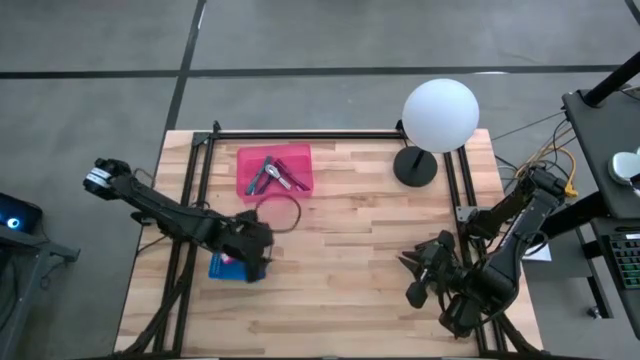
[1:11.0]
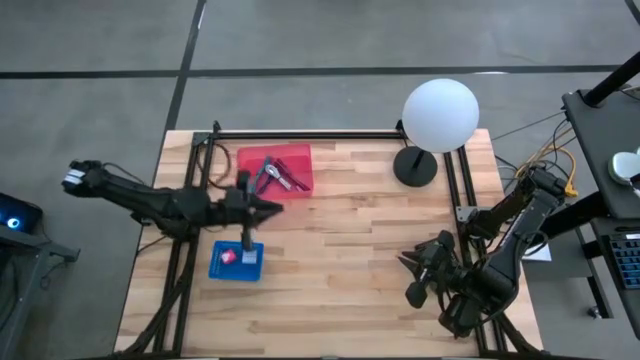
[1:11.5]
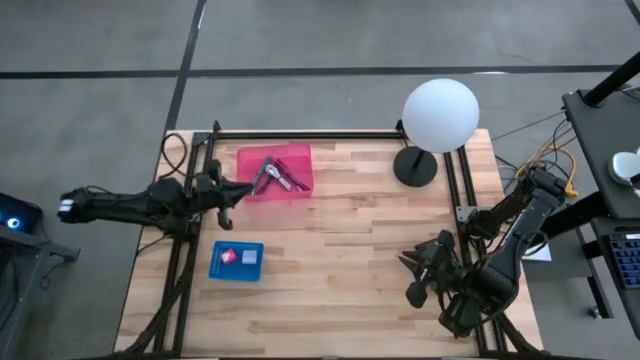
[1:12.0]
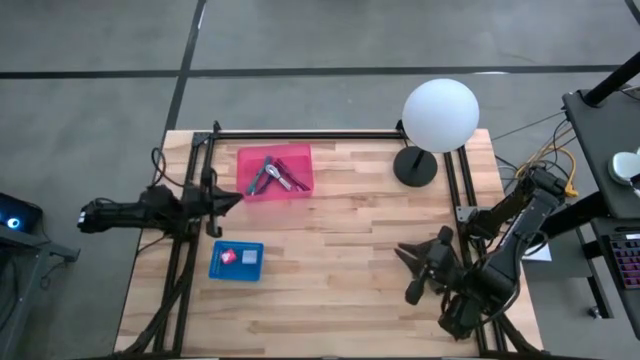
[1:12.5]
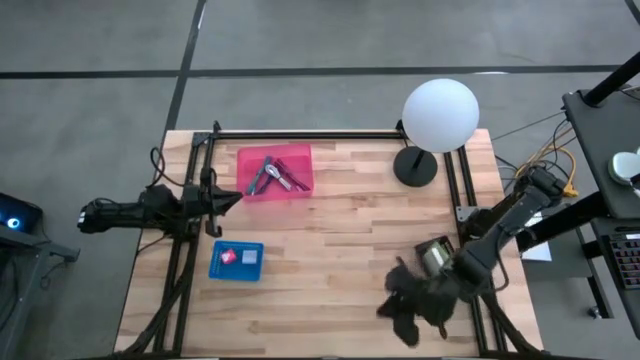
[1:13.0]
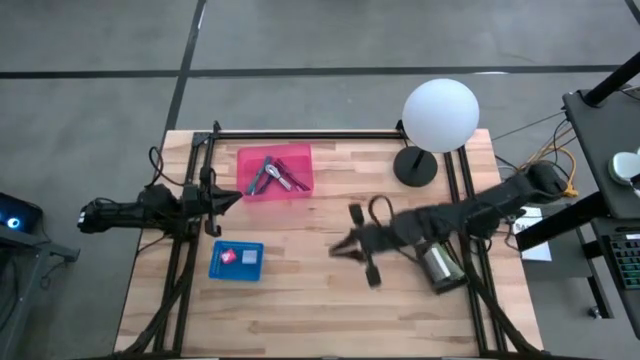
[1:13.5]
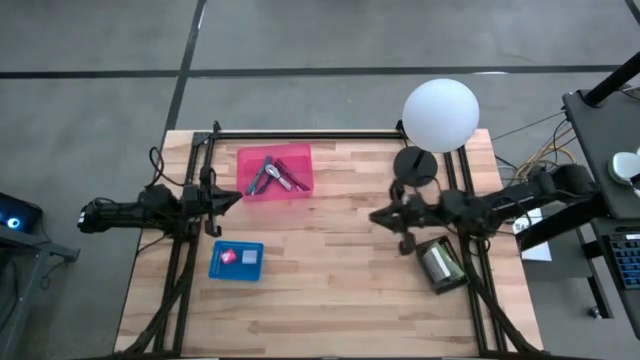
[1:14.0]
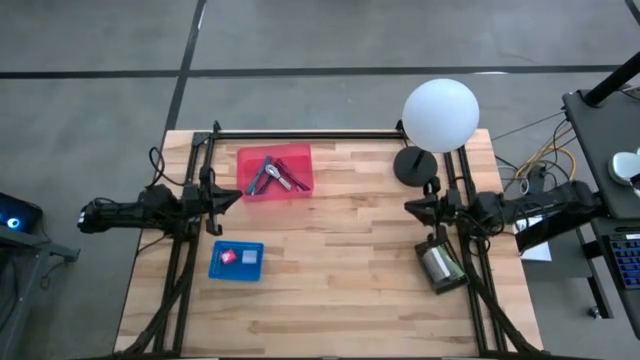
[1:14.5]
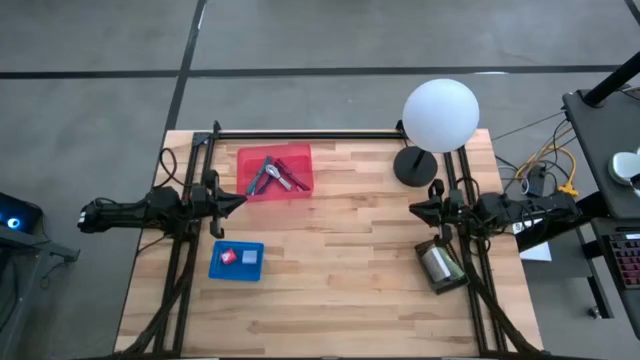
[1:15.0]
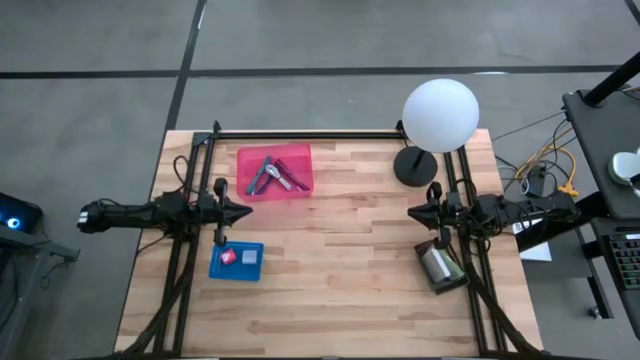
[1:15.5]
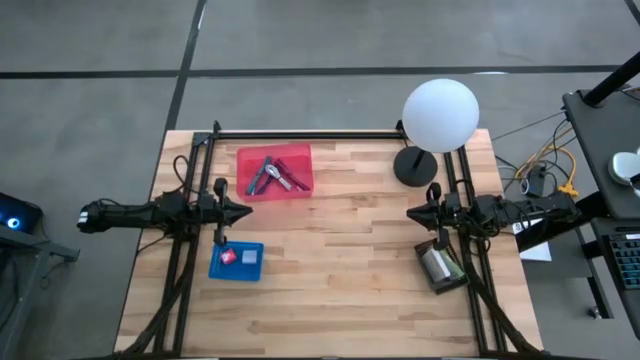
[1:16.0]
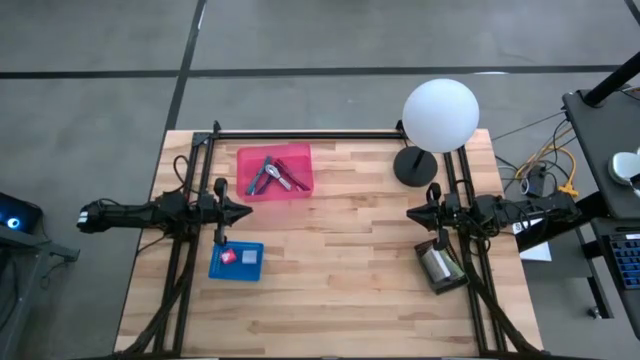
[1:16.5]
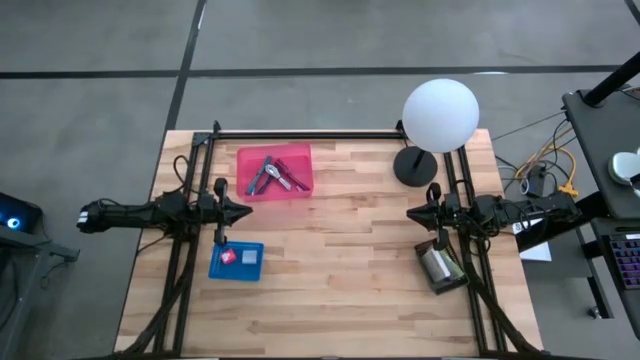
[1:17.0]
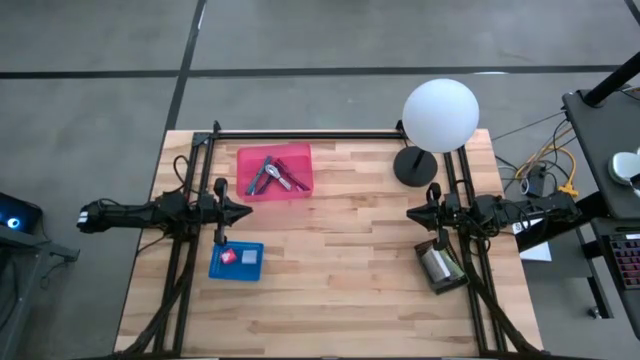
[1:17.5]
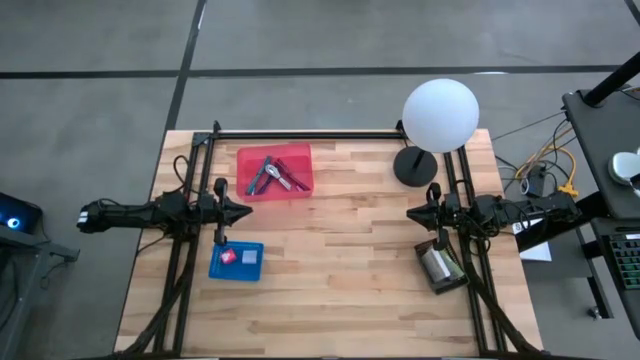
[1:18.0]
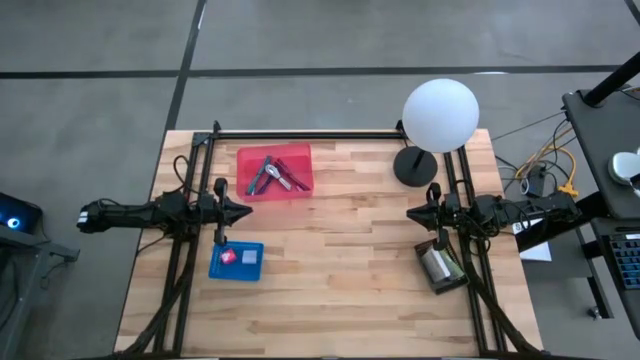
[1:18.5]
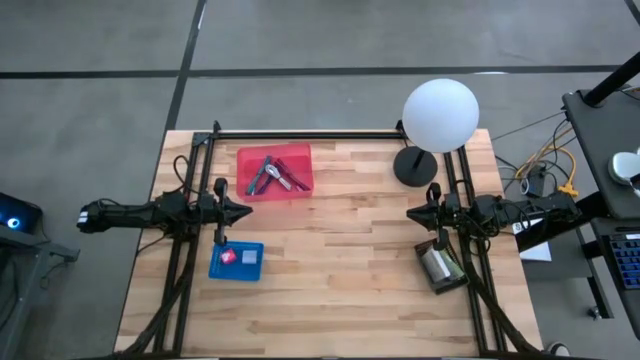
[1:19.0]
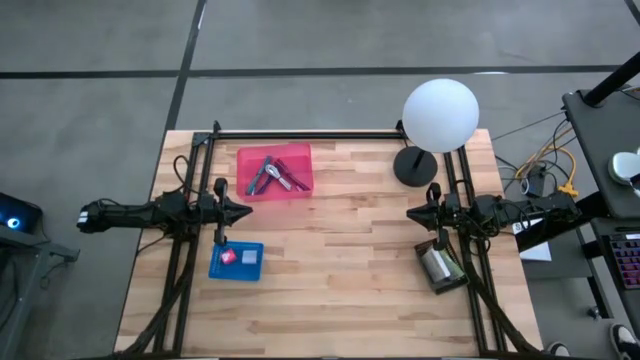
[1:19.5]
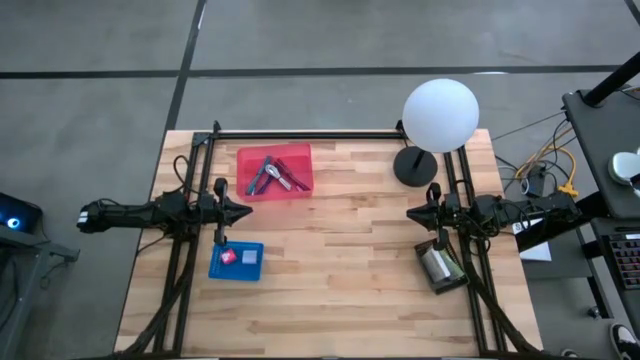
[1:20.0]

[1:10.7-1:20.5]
Task: Pick and place items into bin
Return to Home Position

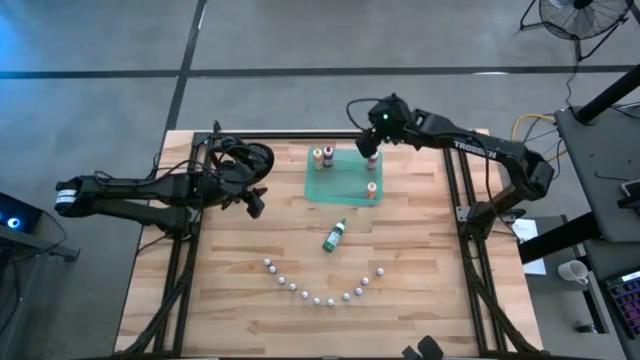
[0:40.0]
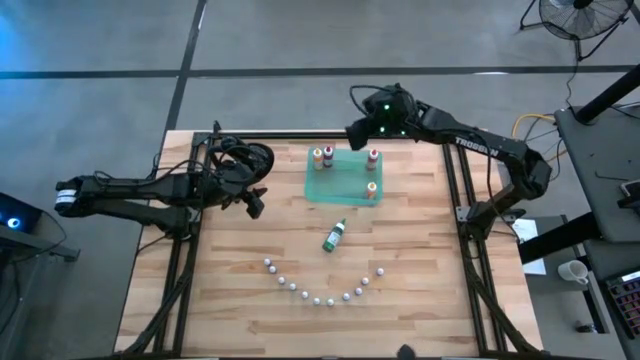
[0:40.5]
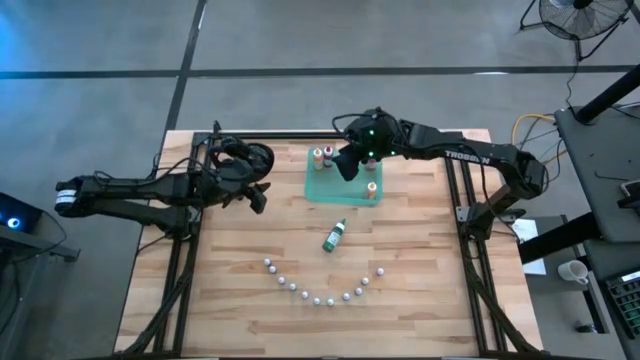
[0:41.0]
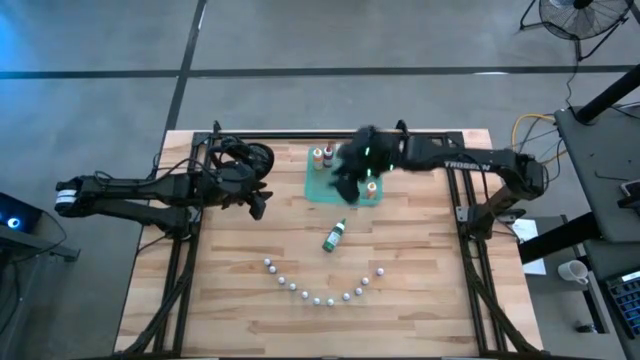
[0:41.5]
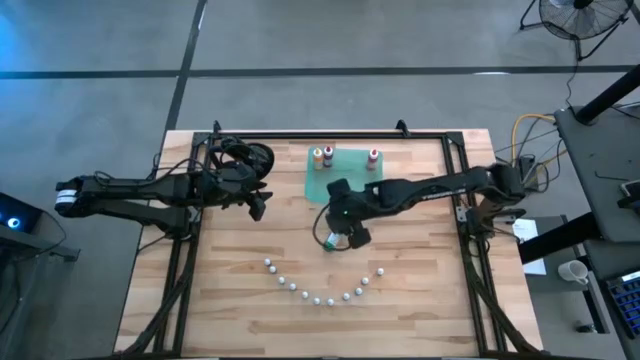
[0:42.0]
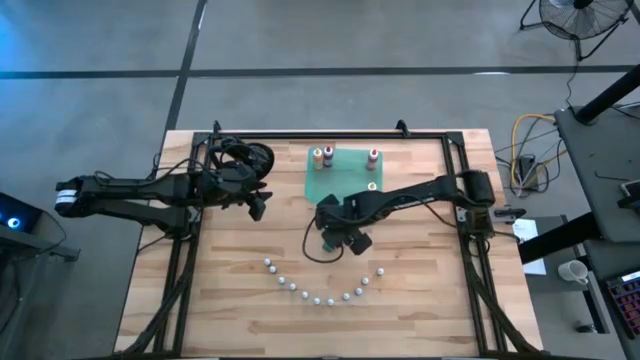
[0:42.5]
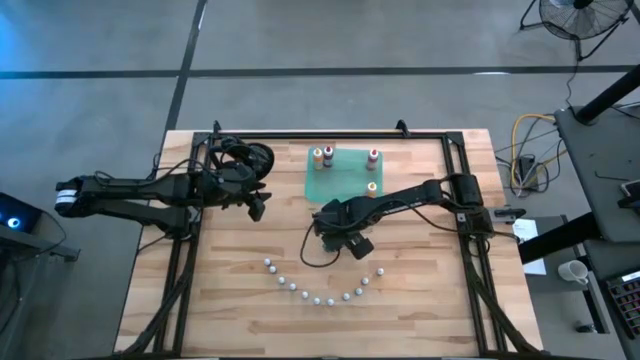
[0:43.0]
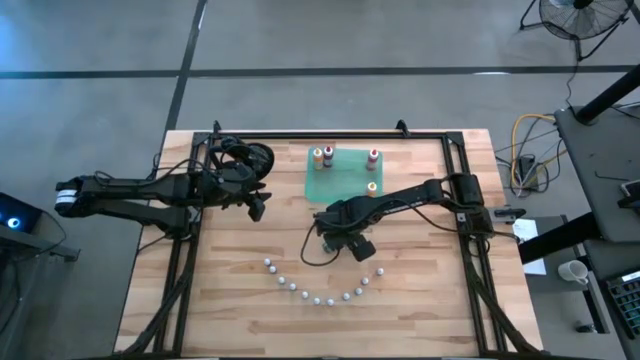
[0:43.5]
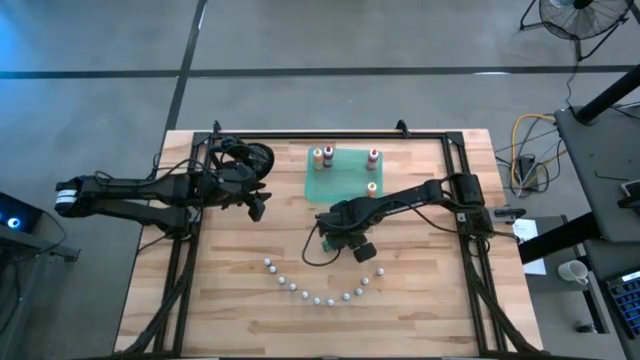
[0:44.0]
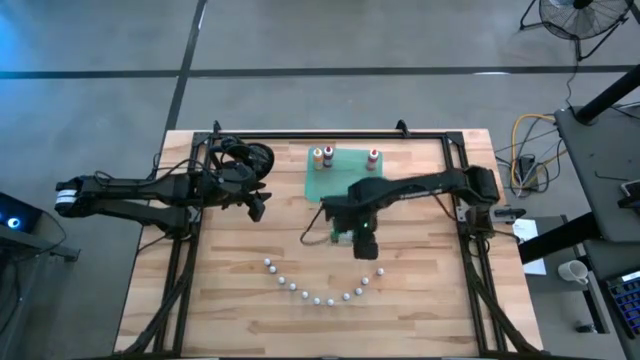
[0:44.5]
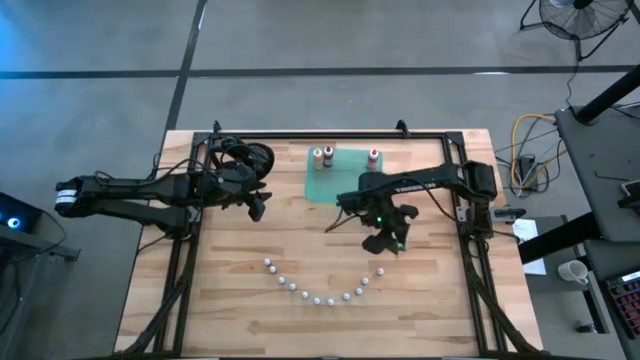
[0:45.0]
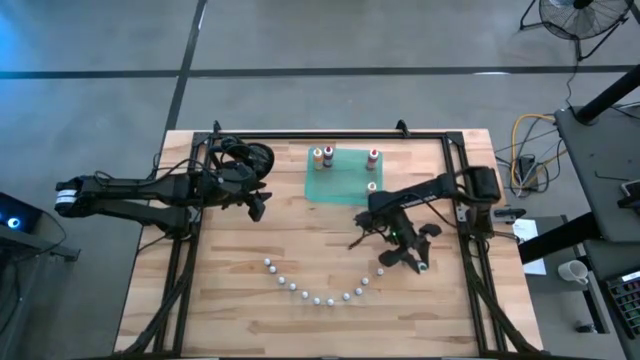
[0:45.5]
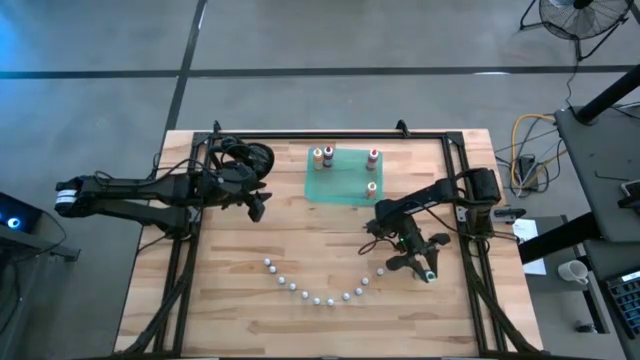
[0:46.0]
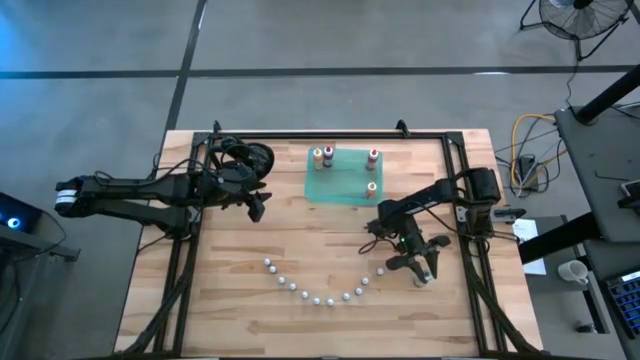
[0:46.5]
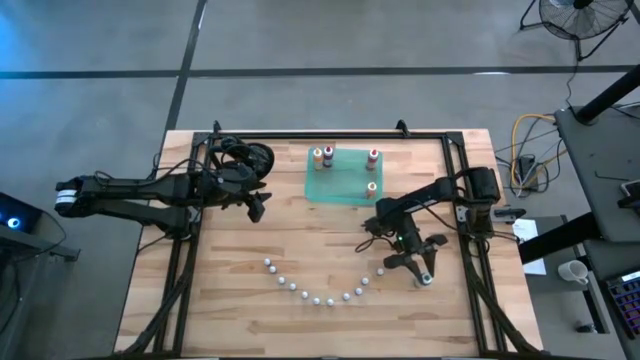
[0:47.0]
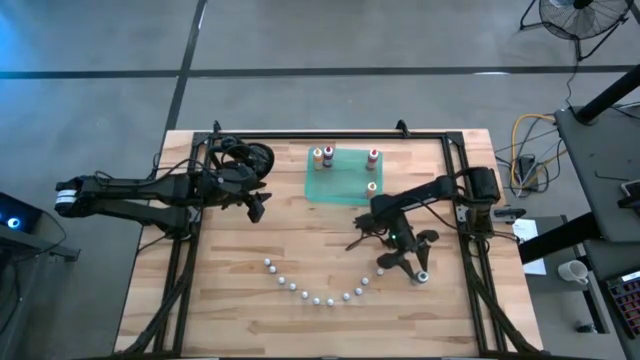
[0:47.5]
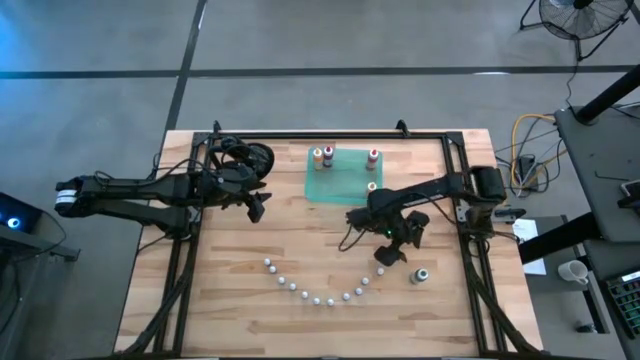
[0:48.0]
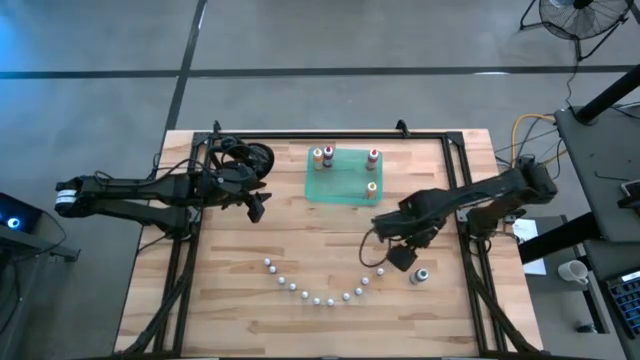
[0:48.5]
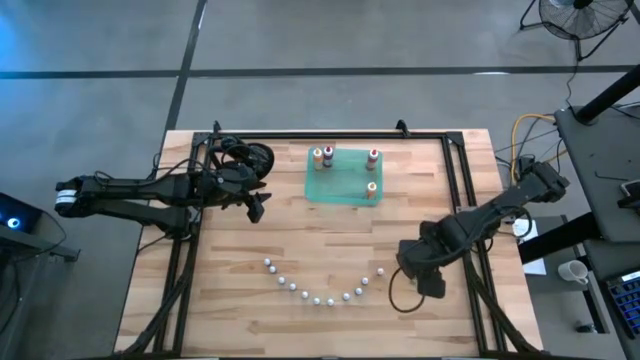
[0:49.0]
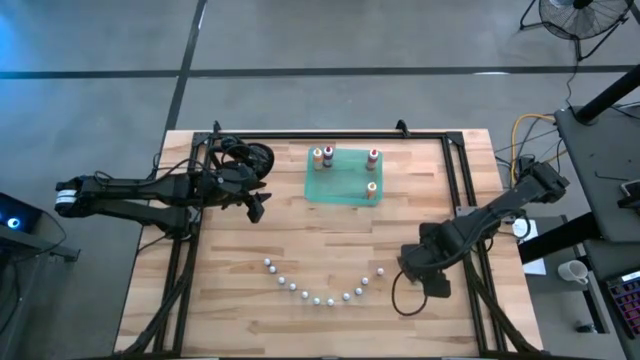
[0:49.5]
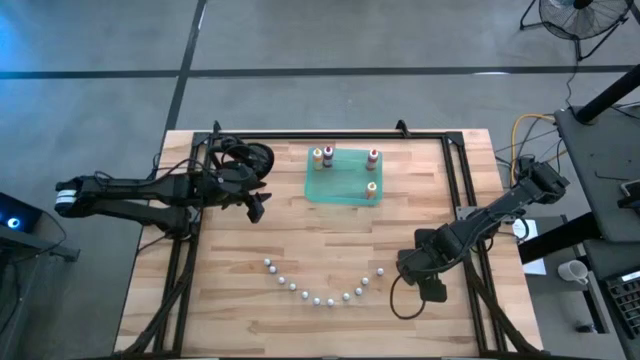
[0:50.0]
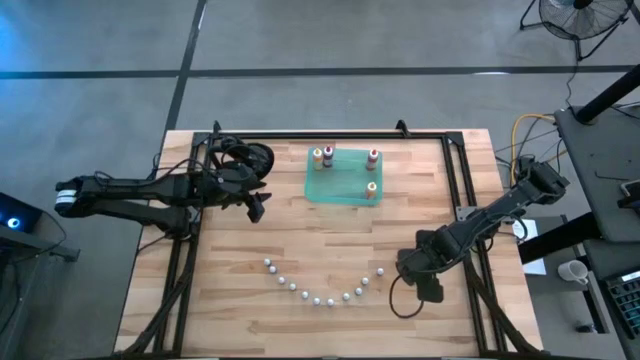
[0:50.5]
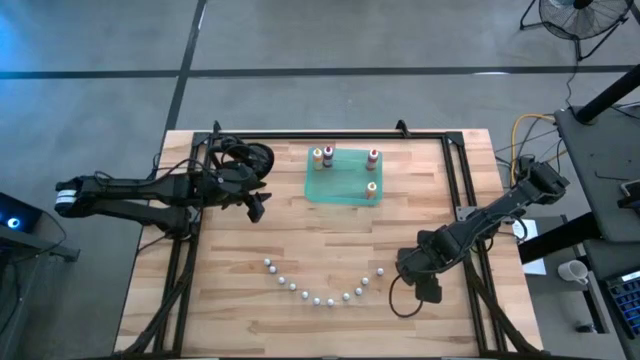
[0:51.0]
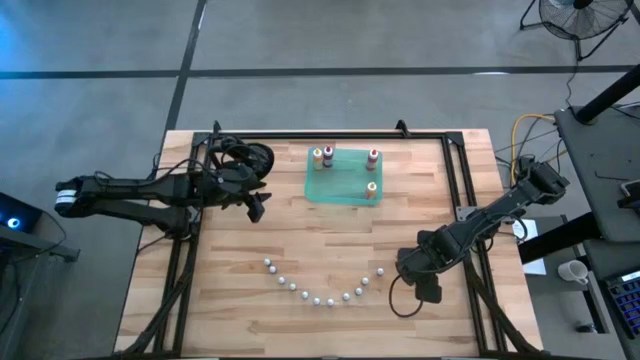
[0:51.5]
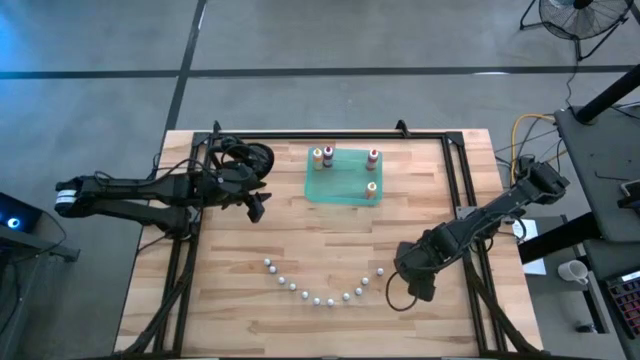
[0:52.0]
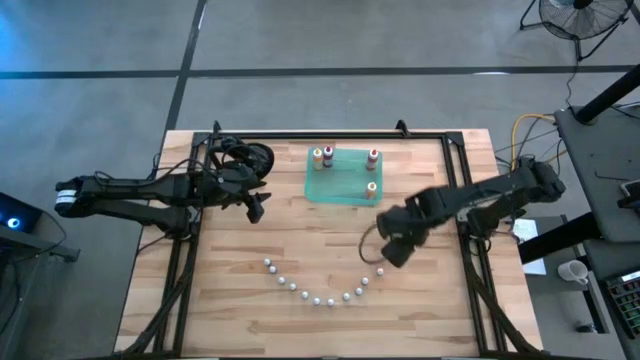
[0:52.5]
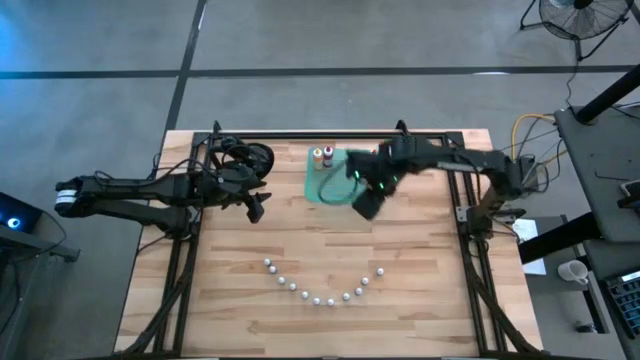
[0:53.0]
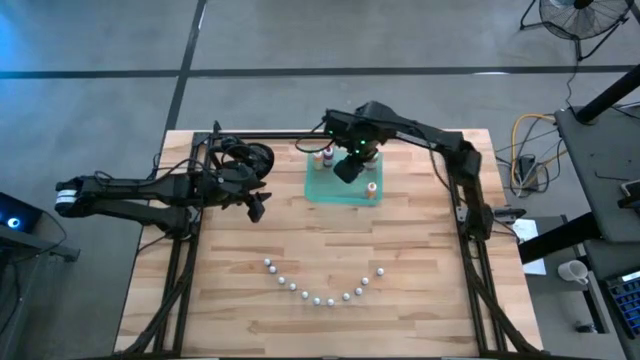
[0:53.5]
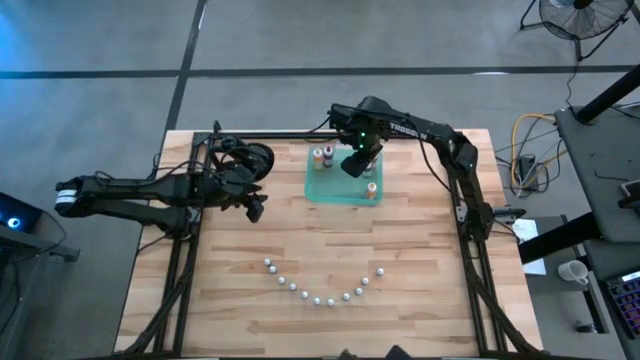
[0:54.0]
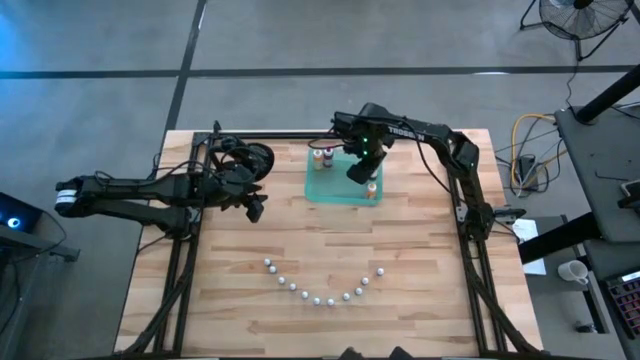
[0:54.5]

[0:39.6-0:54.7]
Task: Pick & Place food coloring
Put the large green food coloring bottle into the green bin
